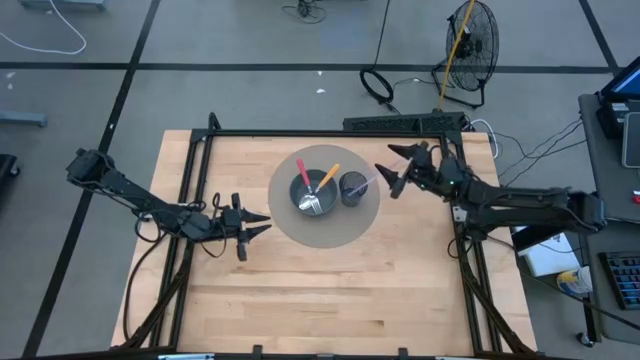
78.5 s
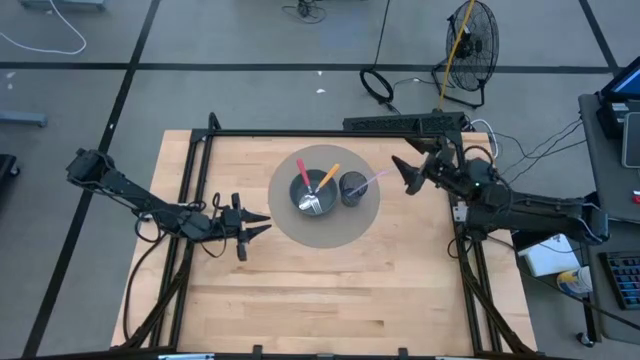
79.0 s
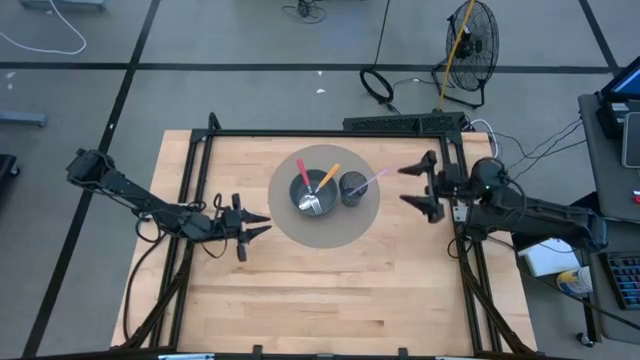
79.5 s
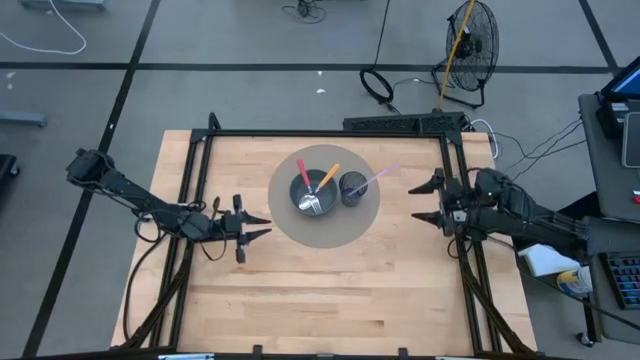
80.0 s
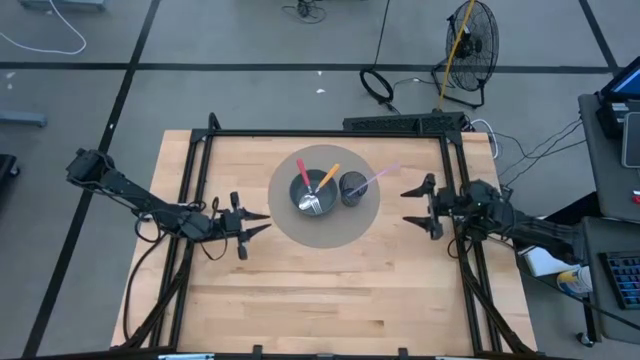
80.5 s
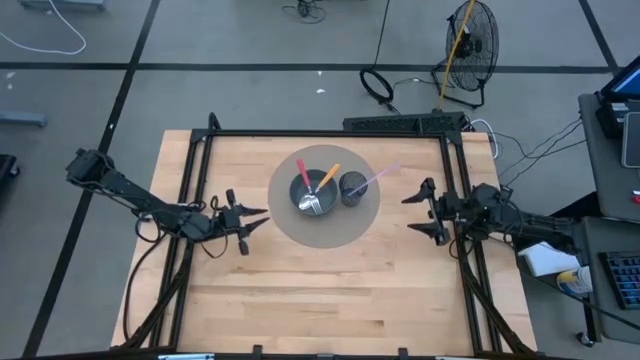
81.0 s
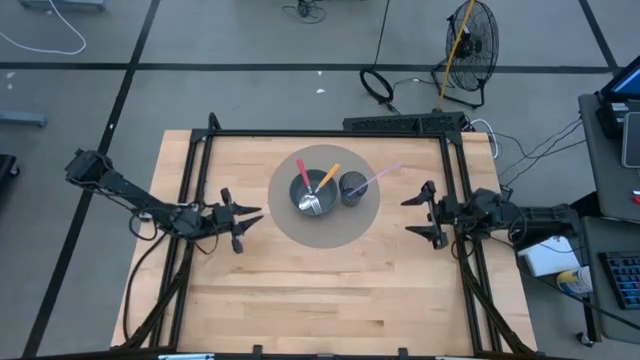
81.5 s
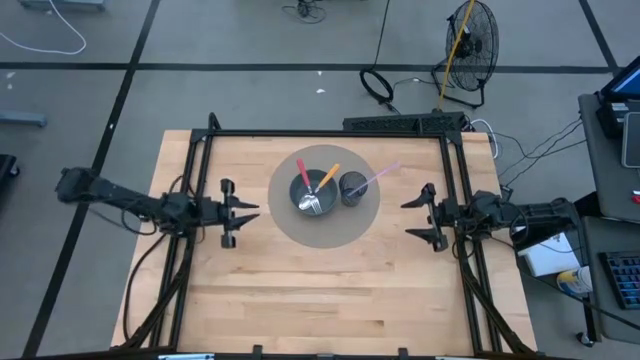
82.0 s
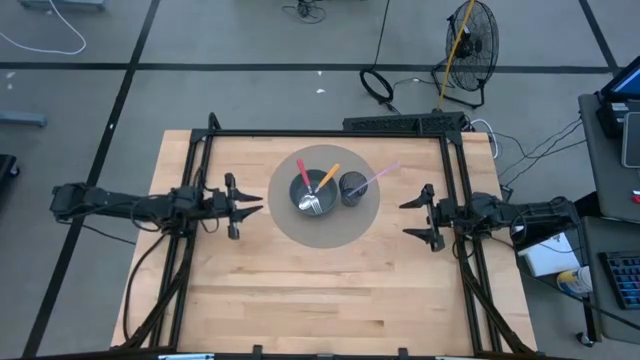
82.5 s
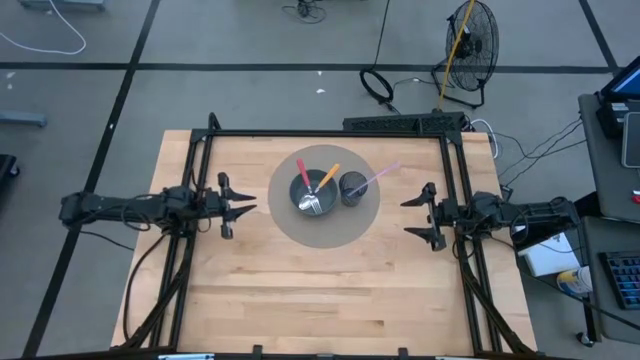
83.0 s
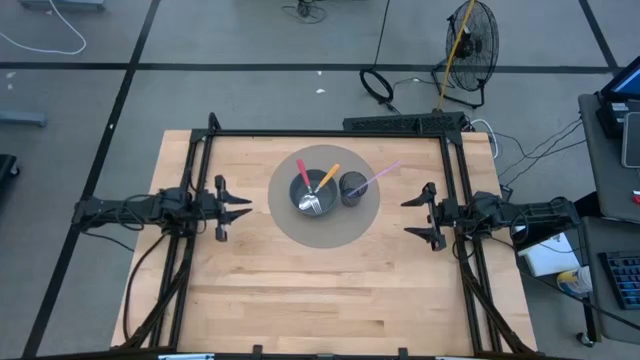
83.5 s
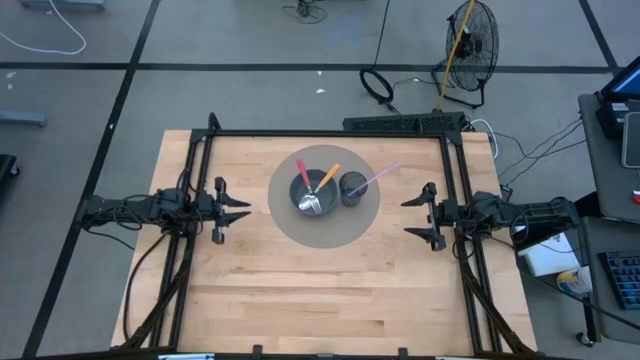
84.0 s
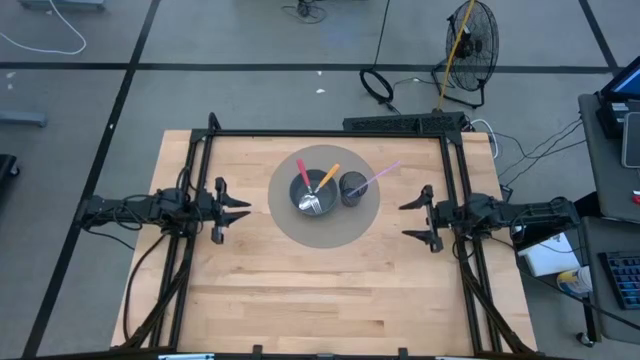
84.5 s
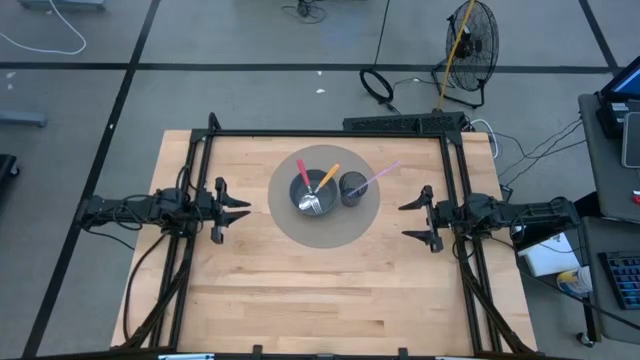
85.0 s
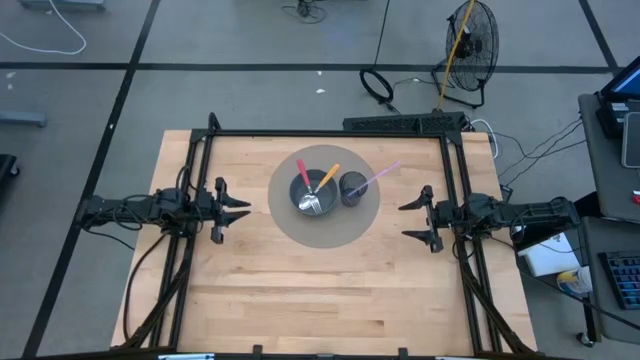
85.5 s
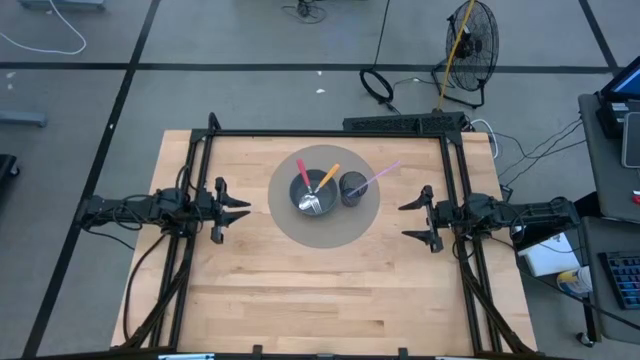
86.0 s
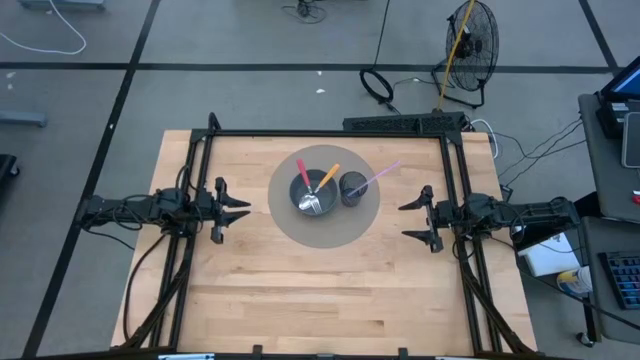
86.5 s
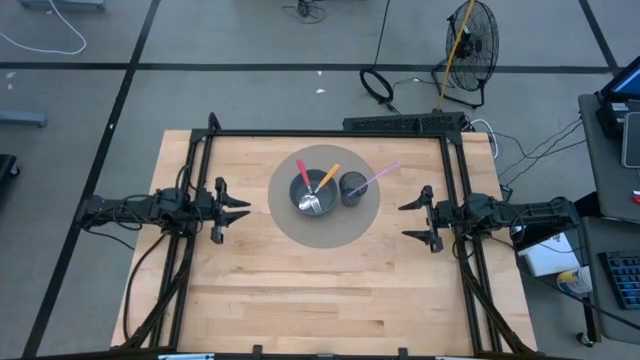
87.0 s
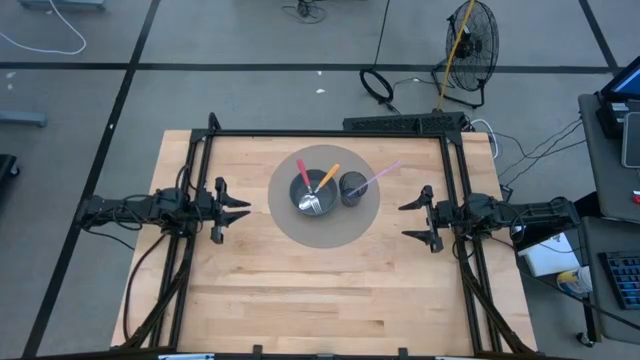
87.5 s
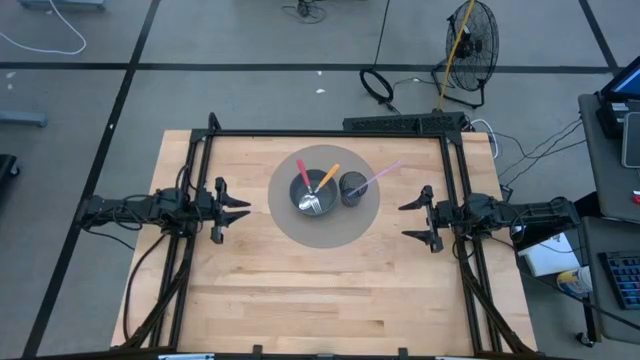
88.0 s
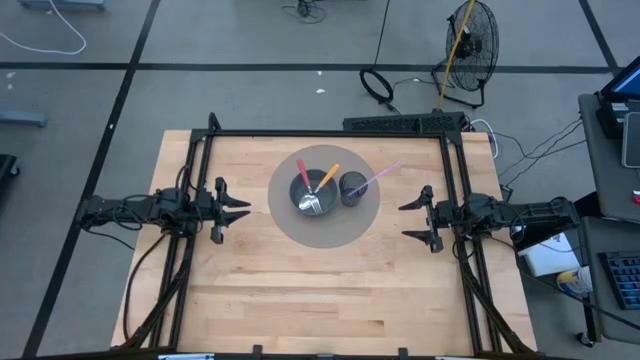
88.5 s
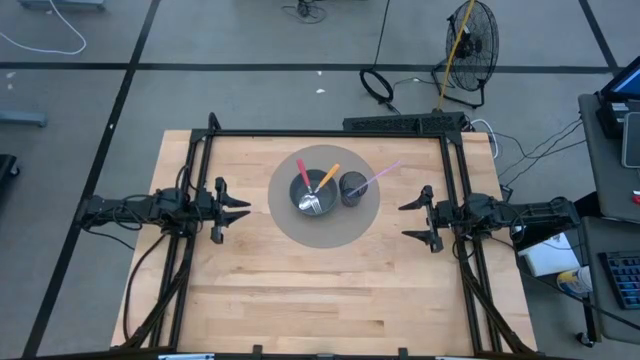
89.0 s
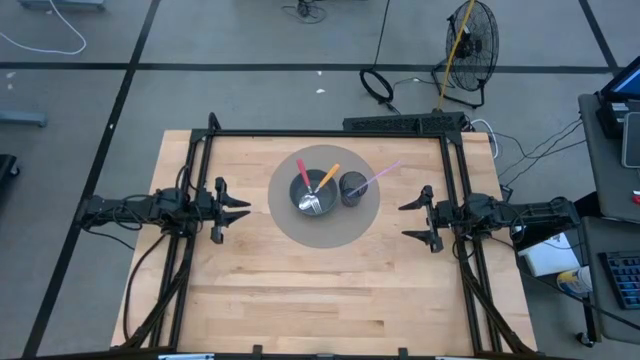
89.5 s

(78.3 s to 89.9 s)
Task: Pick & Place Utensil
Return to Home Position

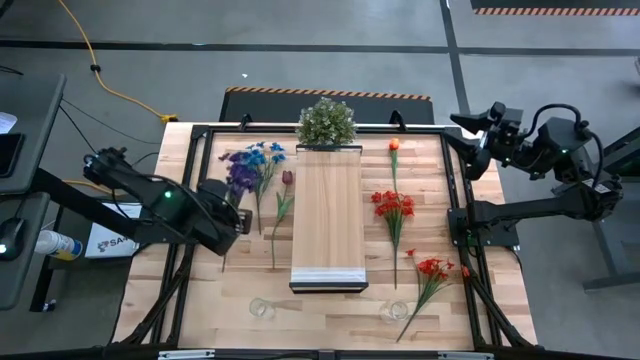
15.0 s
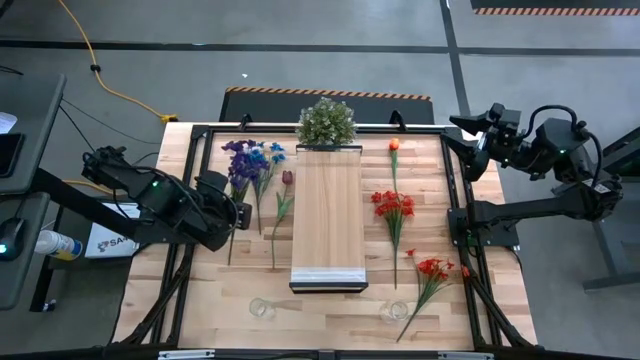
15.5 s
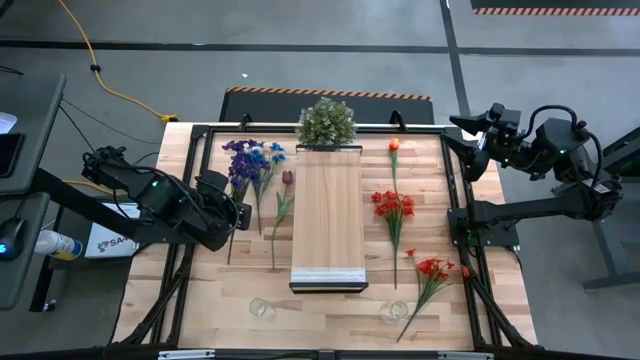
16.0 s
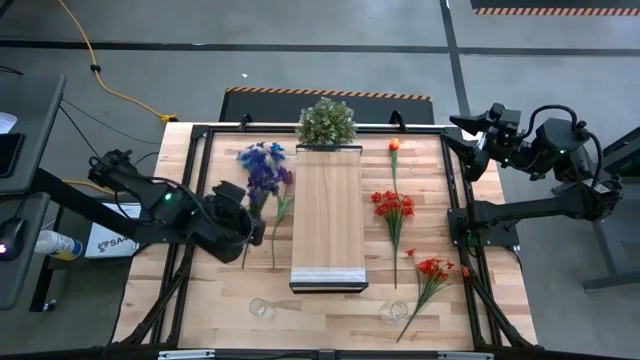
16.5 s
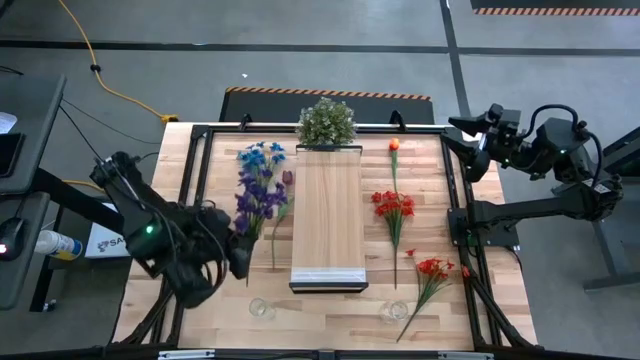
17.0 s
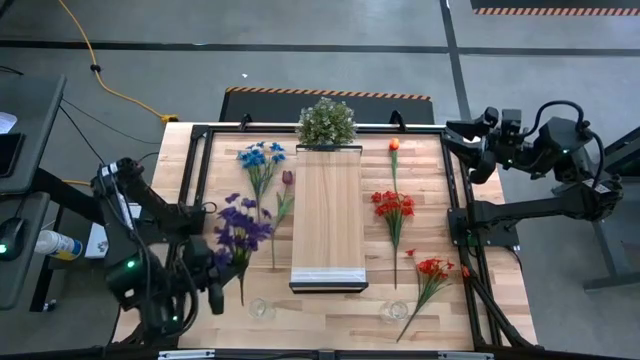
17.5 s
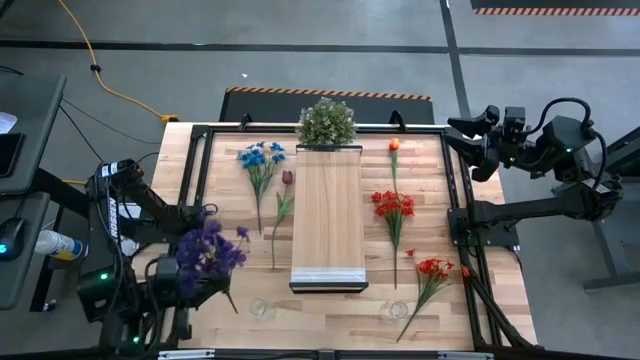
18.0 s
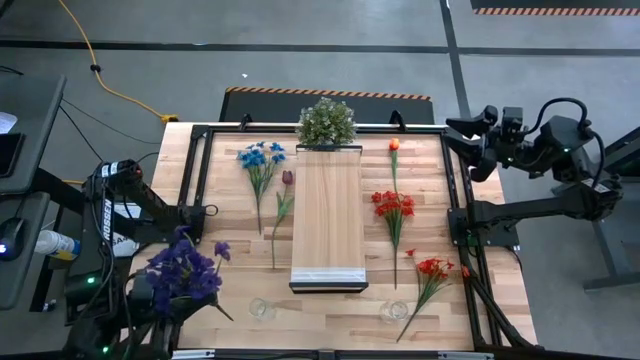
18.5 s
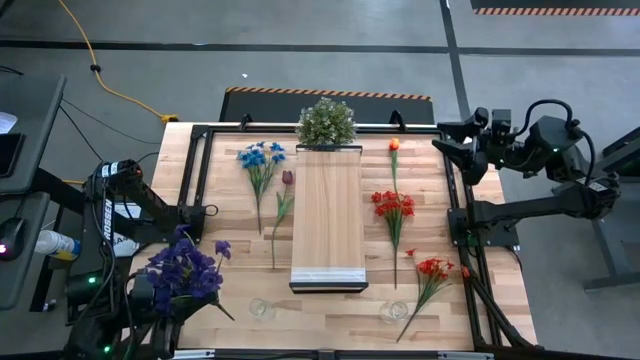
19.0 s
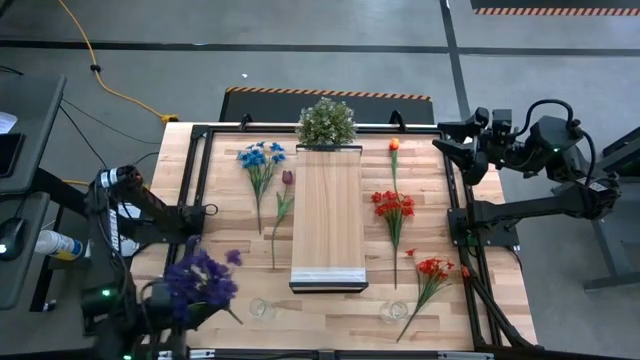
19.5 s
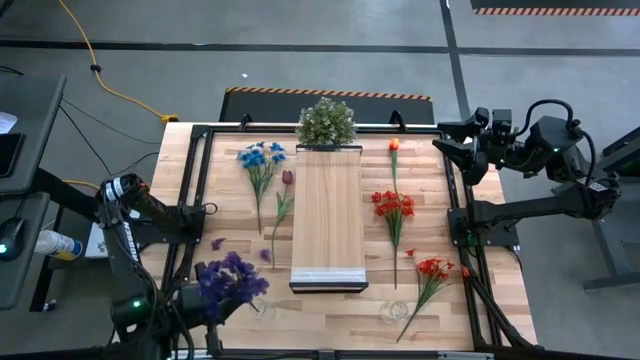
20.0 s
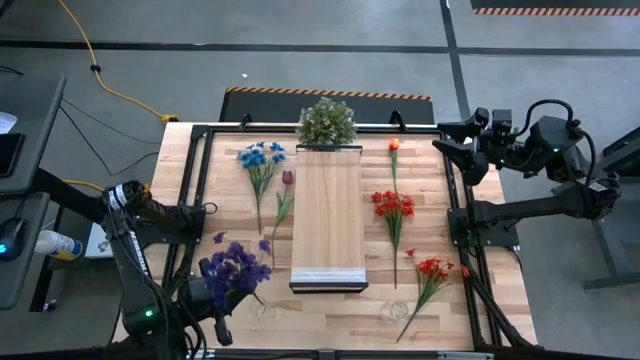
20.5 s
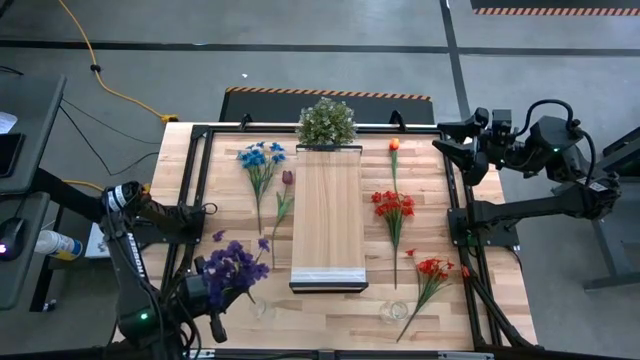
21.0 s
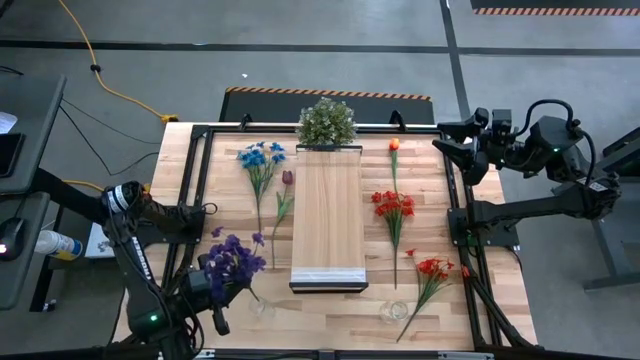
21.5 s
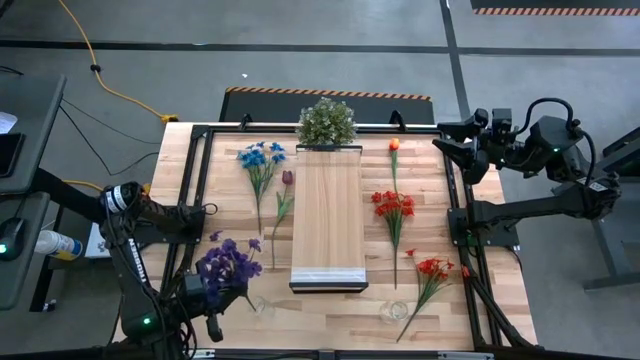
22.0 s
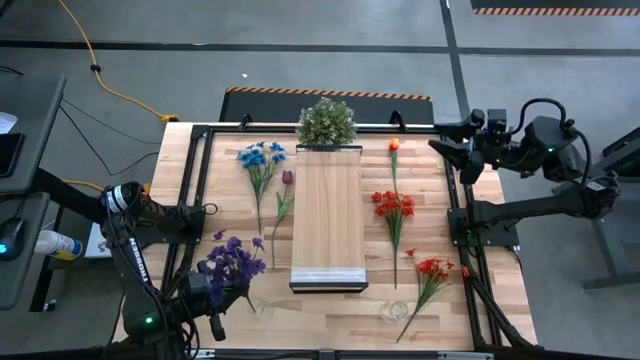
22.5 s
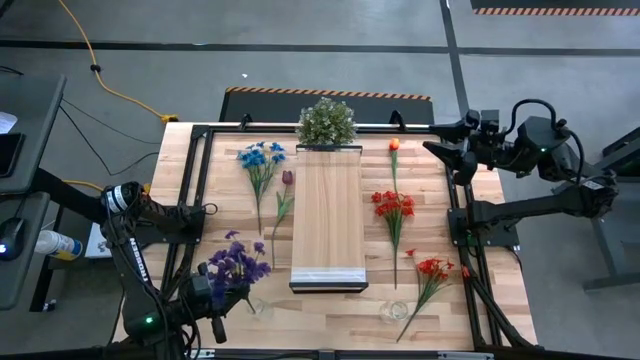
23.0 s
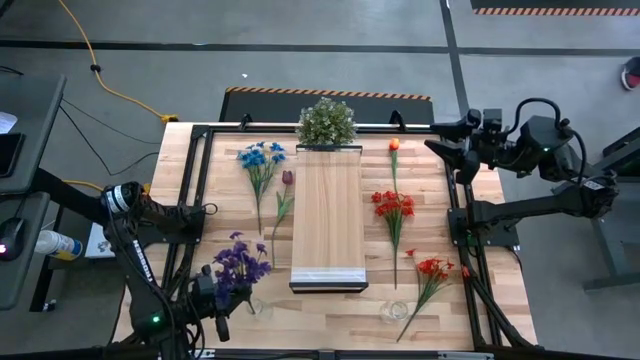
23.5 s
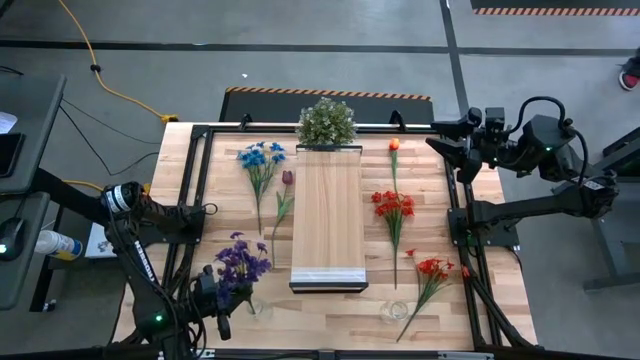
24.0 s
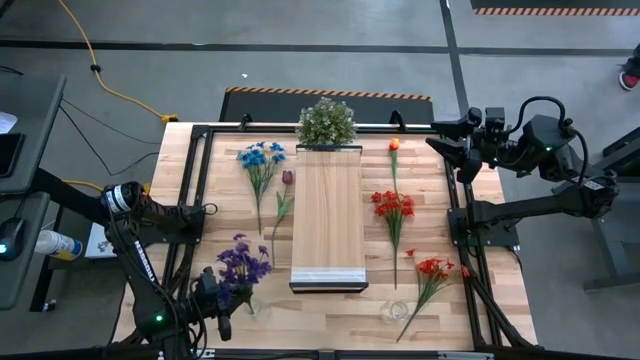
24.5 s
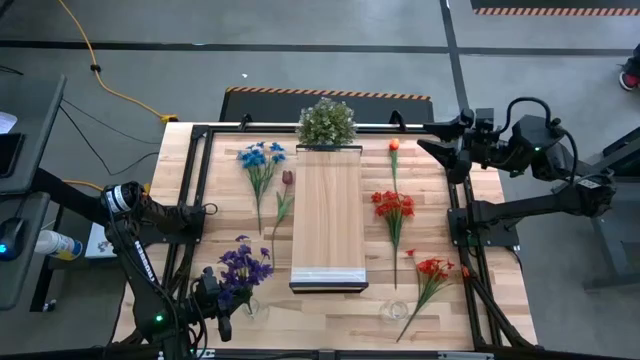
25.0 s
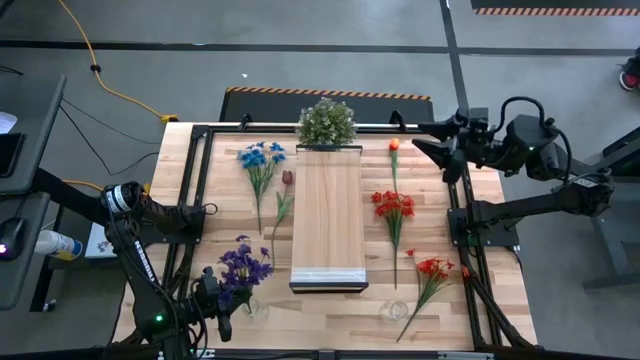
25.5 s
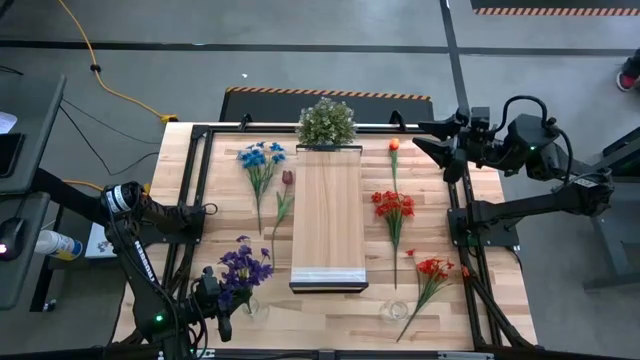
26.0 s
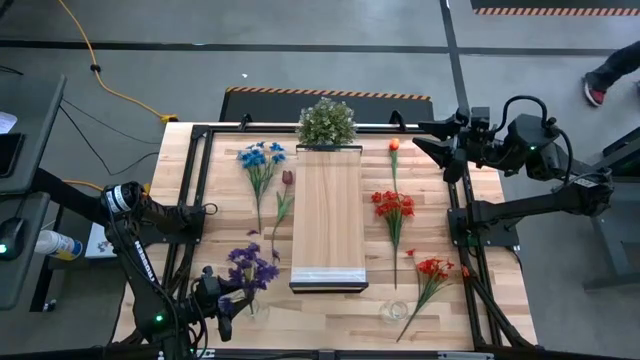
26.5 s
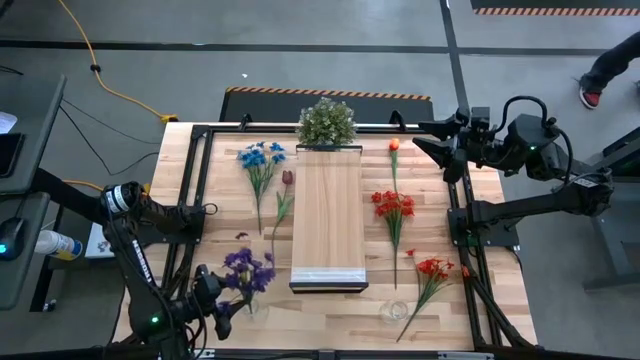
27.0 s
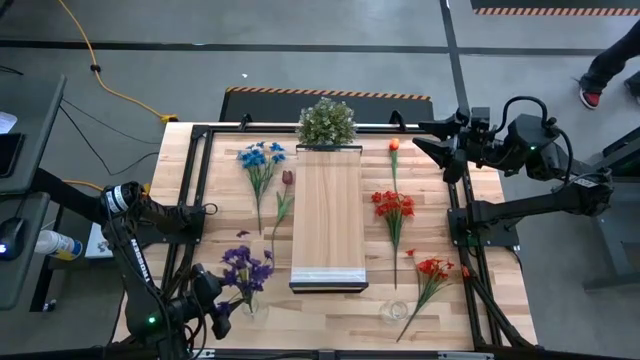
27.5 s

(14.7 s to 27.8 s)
Task: Pick and place flowers into a vace then onto a shelf
Put the purple flowers into the left transparent vase
